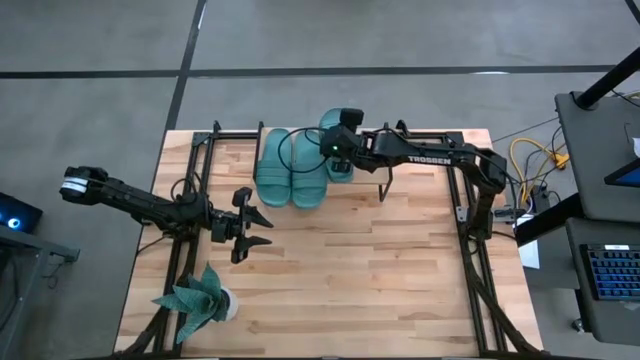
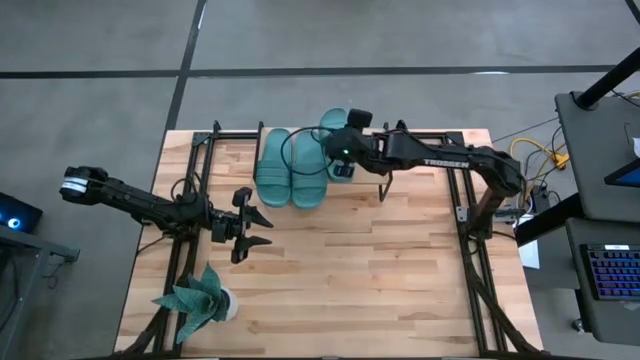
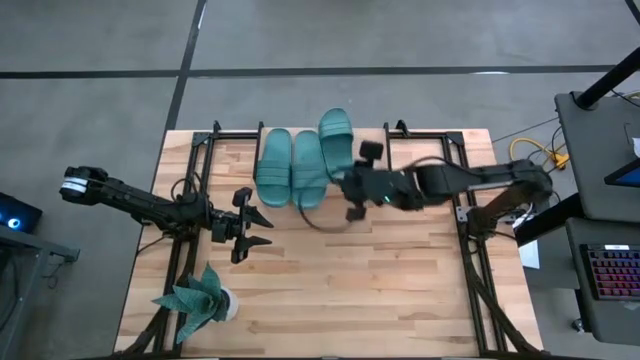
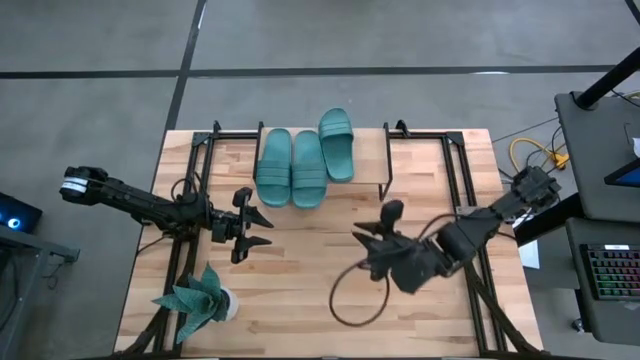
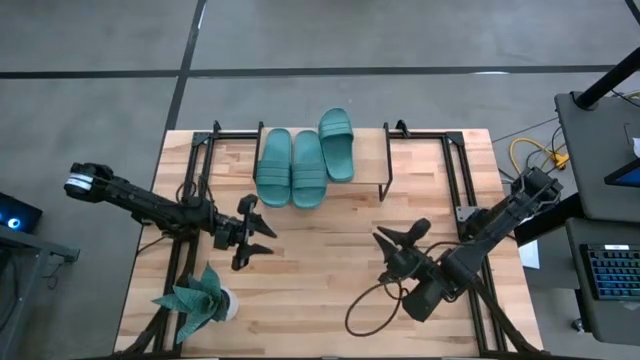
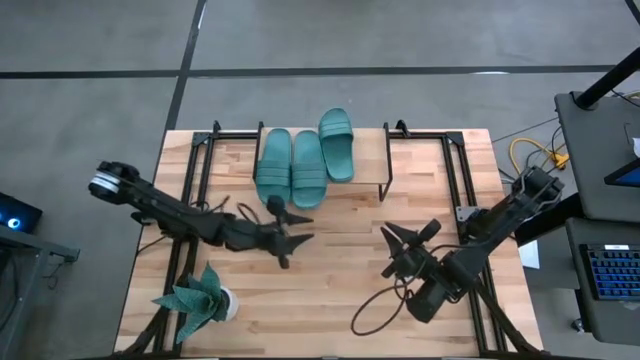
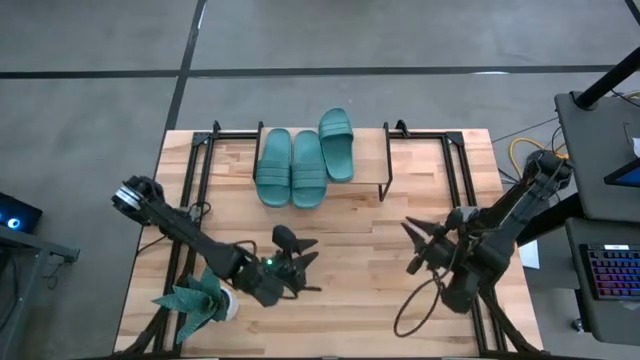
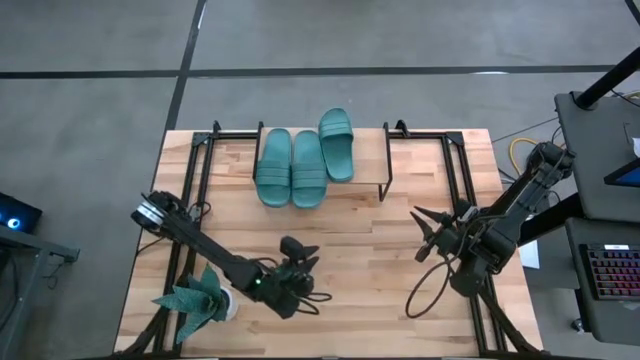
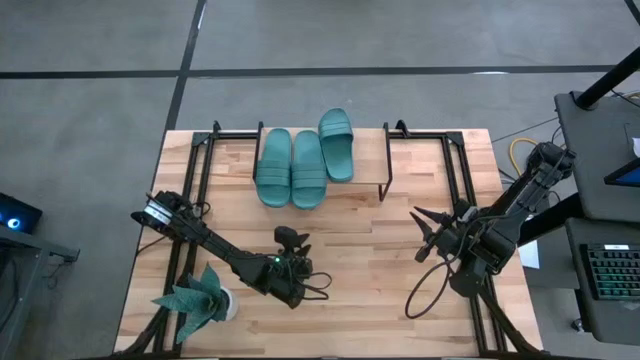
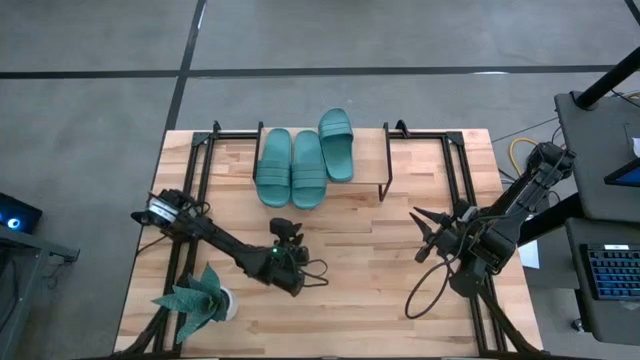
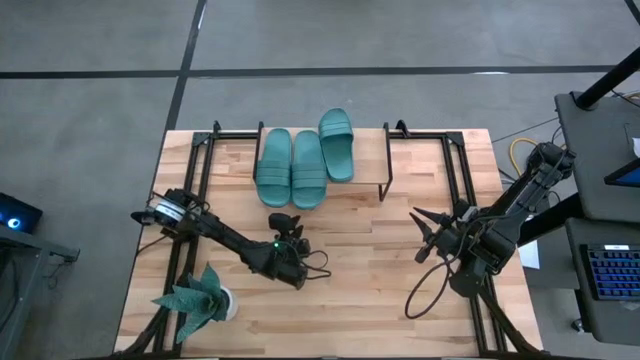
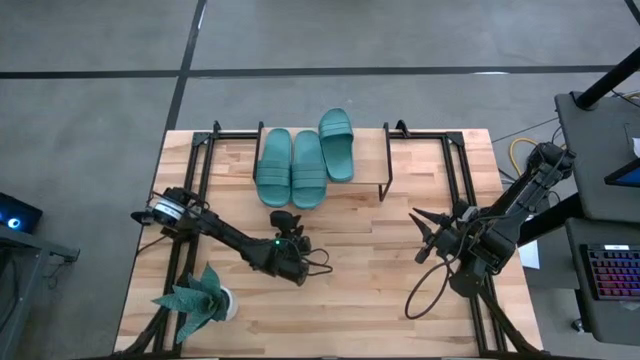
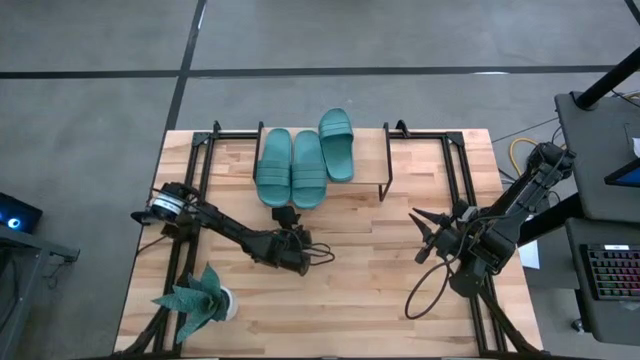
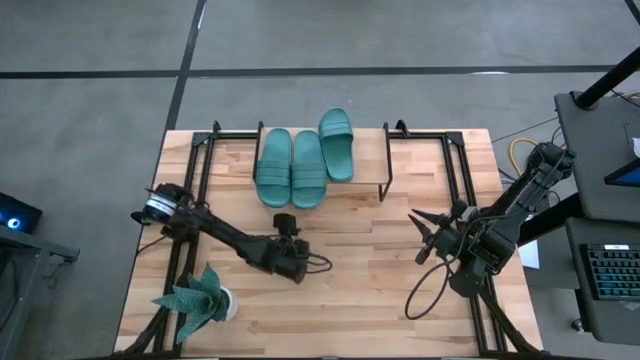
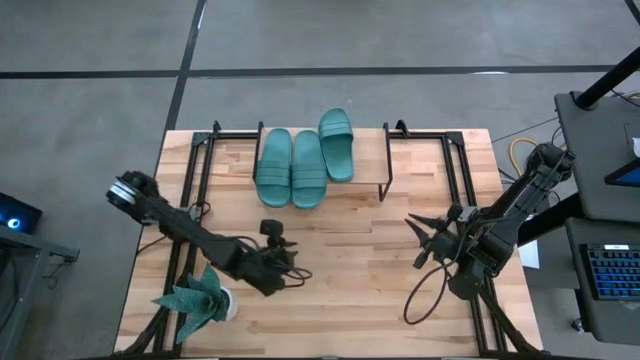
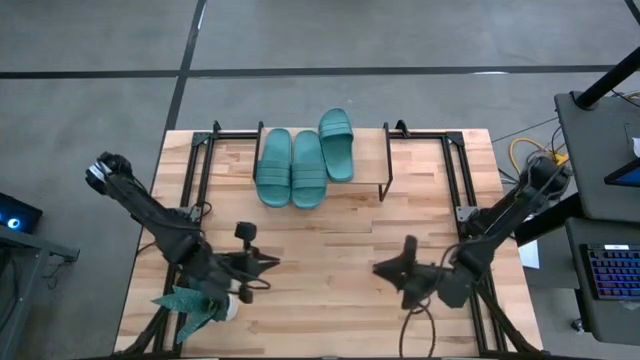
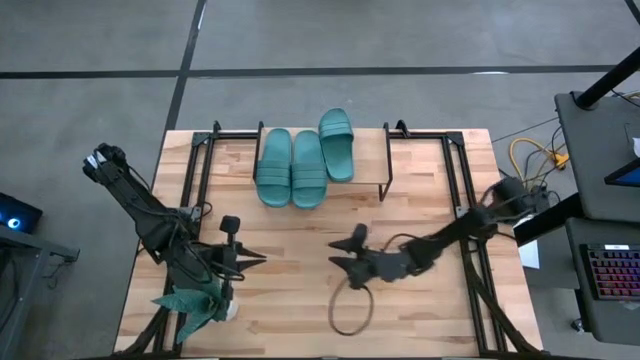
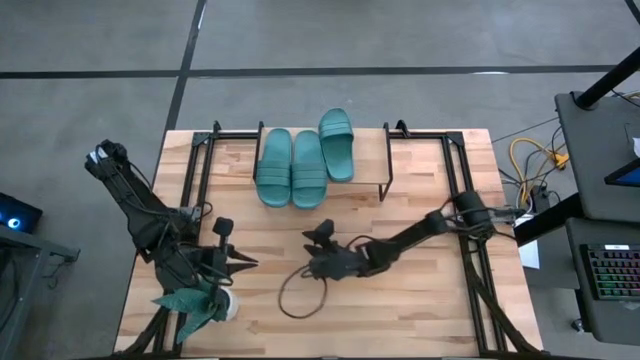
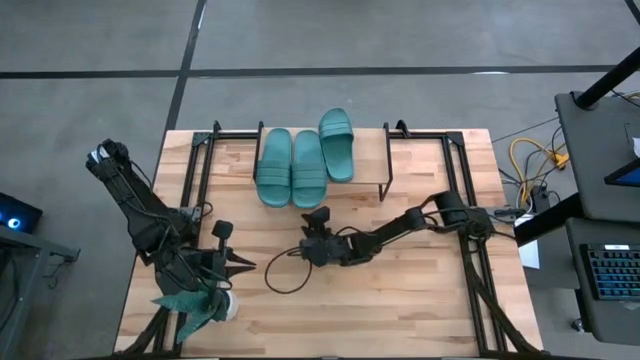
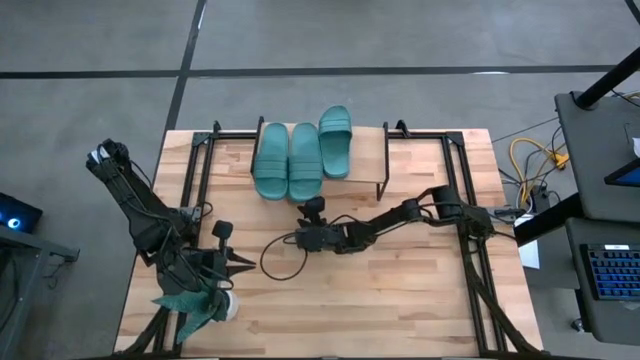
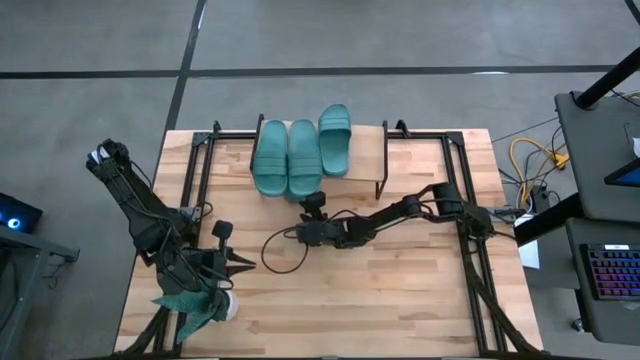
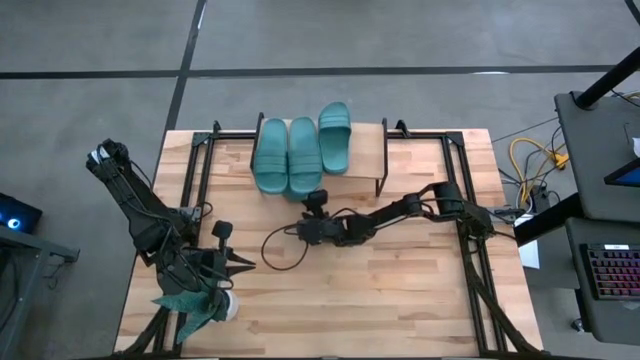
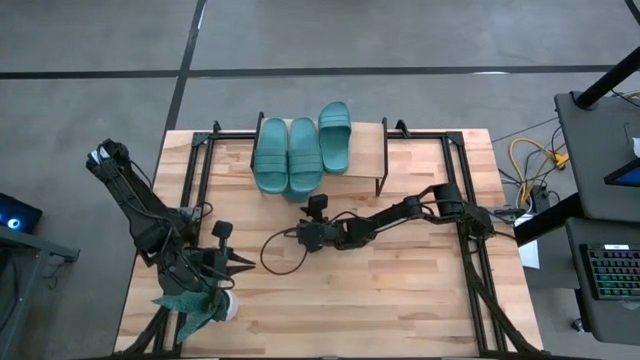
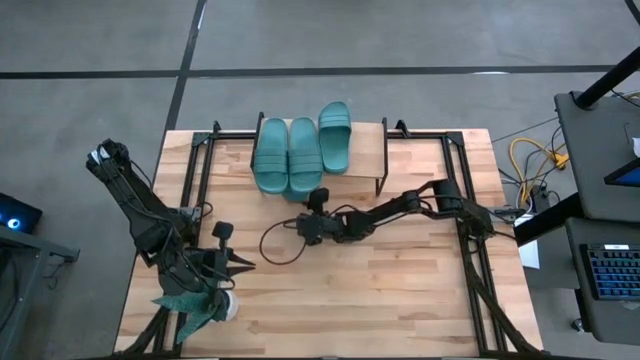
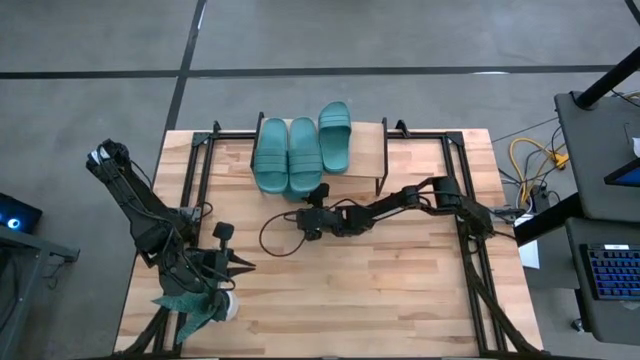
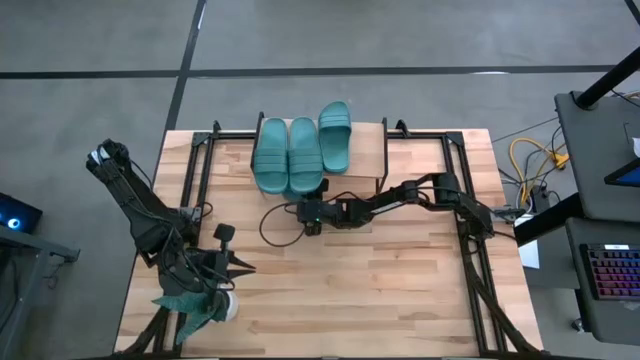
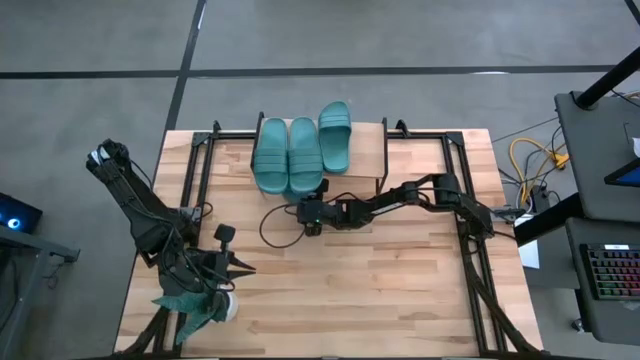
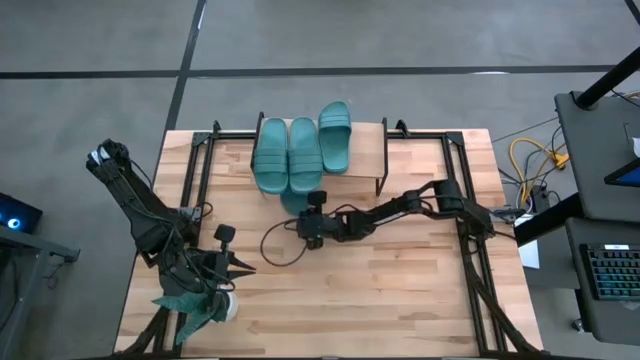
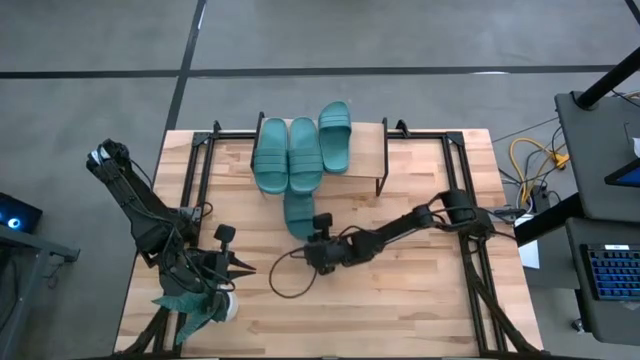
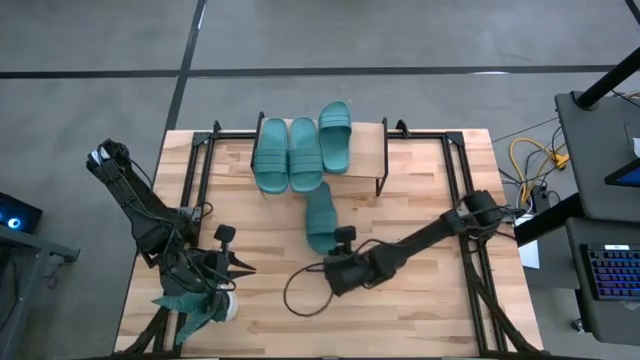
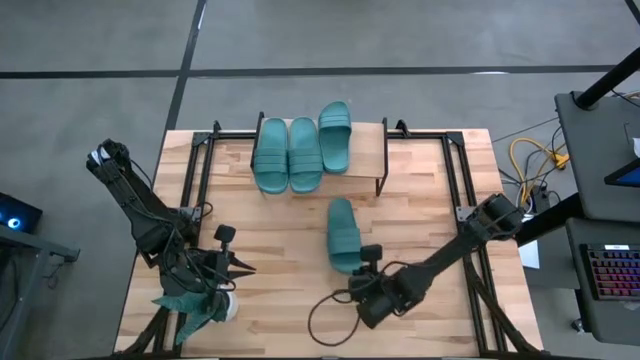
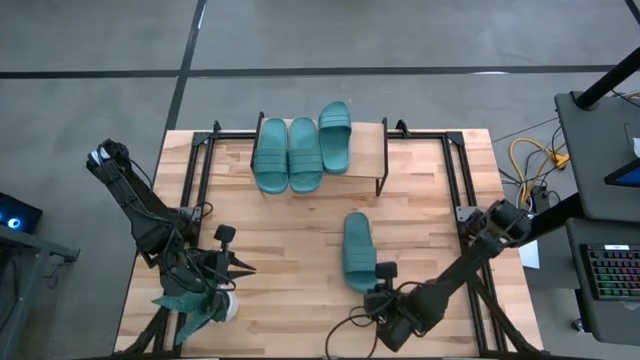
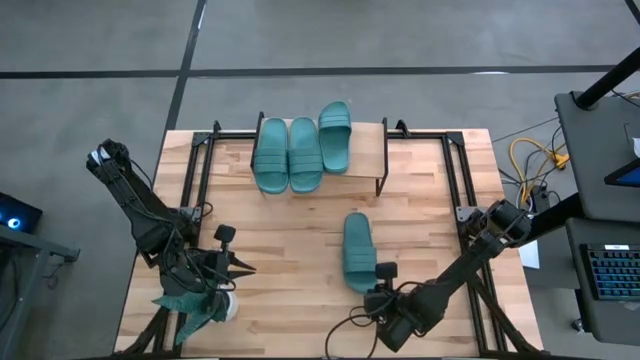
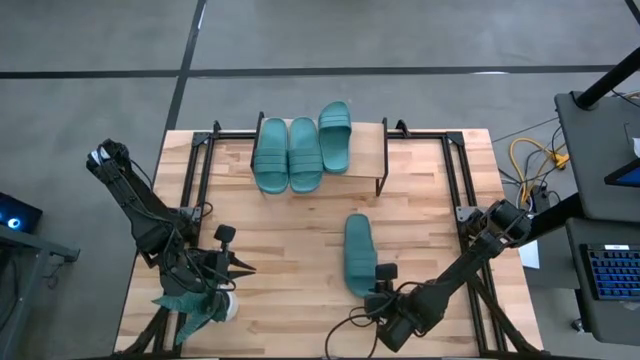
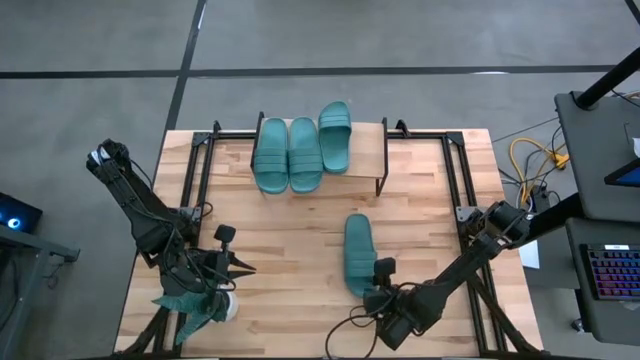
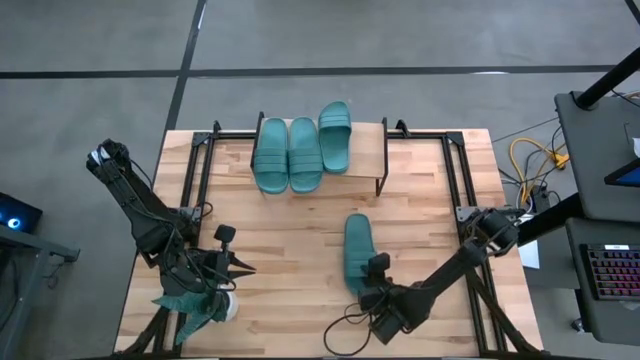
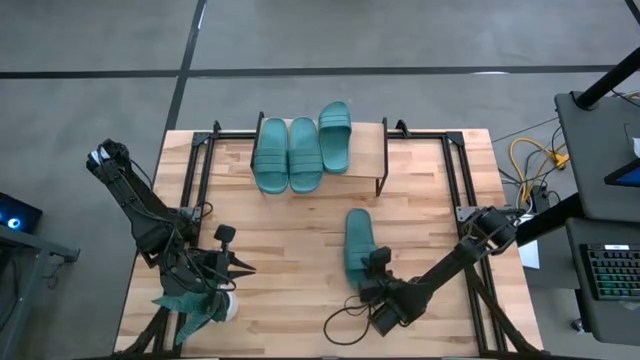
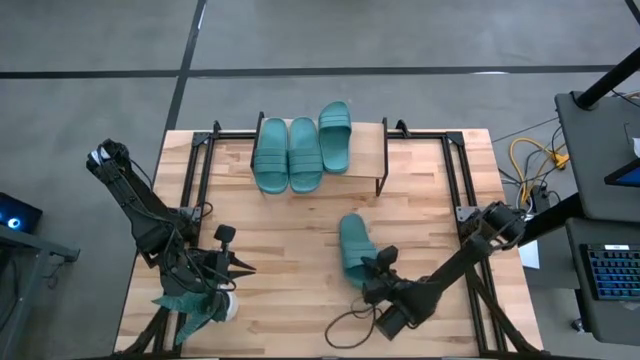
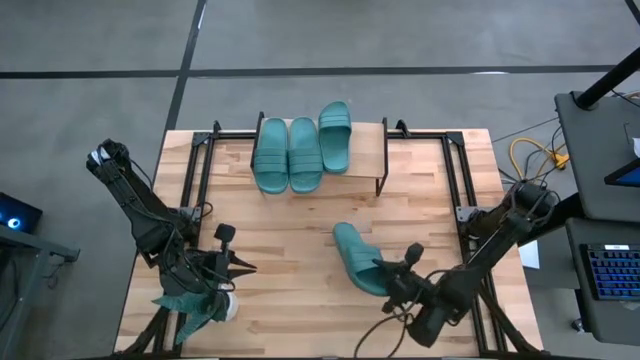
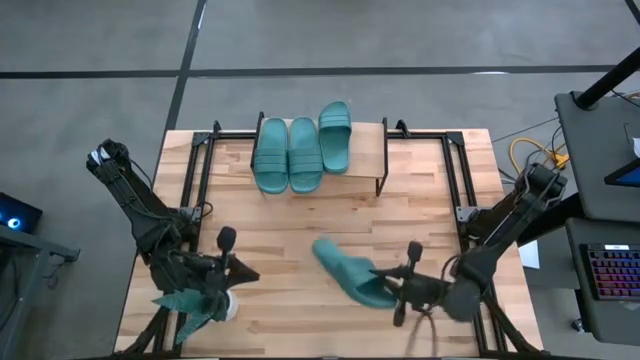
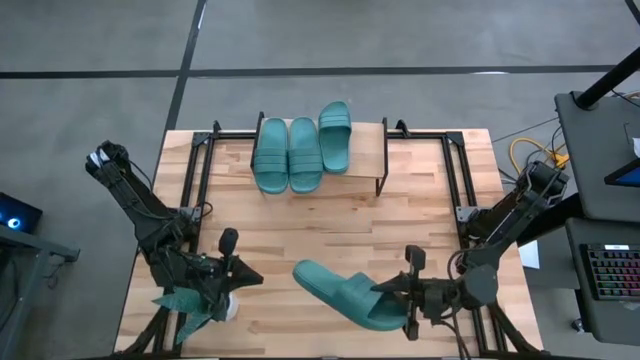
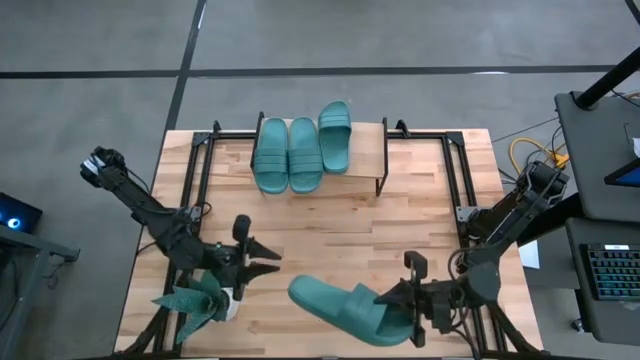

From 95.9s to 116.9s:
Task: Pick and place slides into the shelf
Put the blue slipper on the shelf

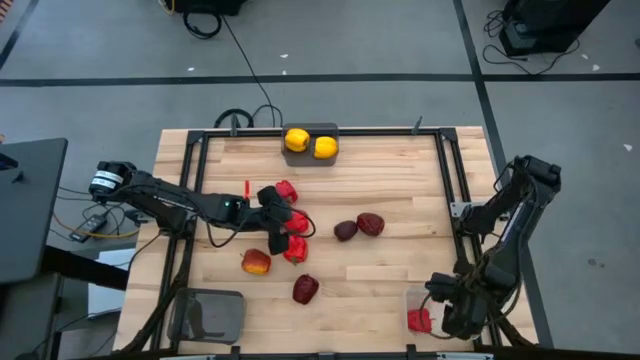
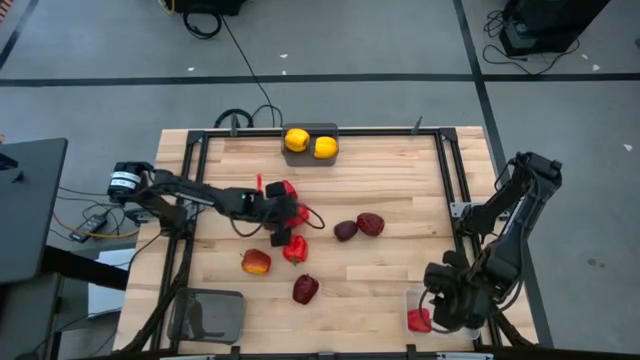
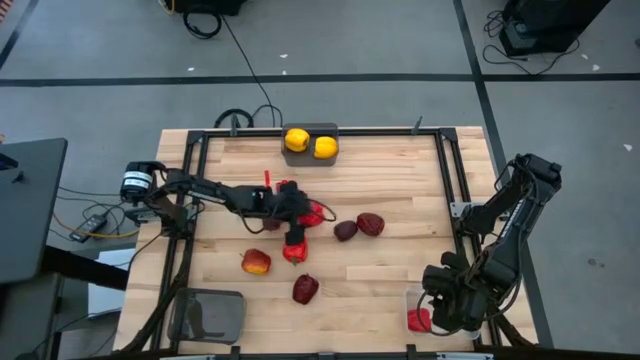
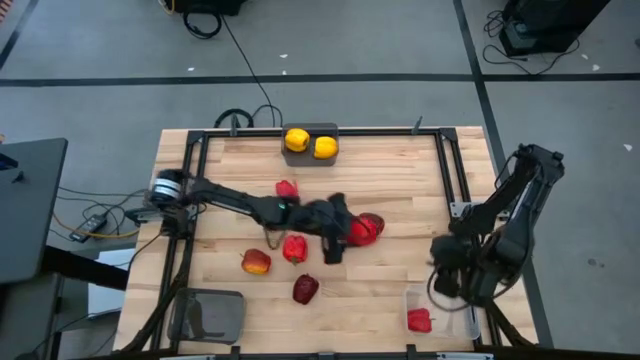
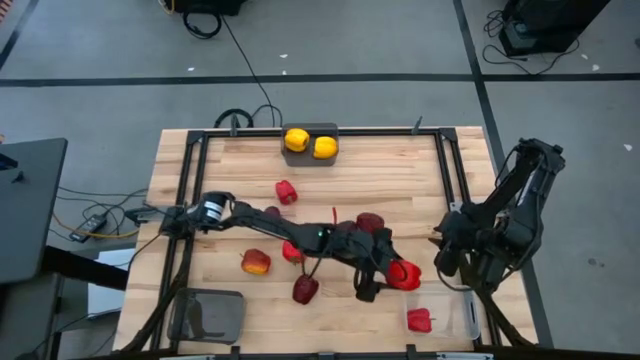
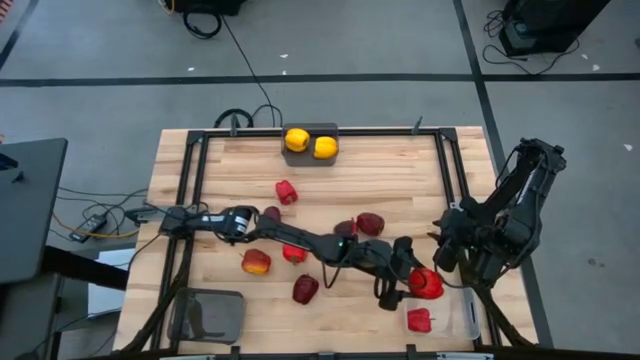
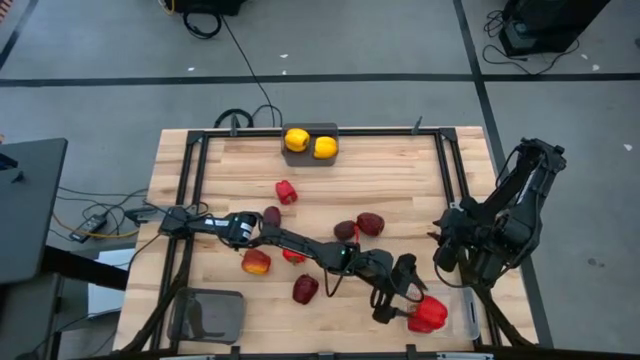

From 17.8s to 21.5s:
Task: Sort produce into baskets
Put the red bell pepper into the transparent bin
